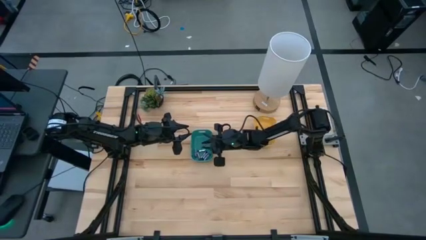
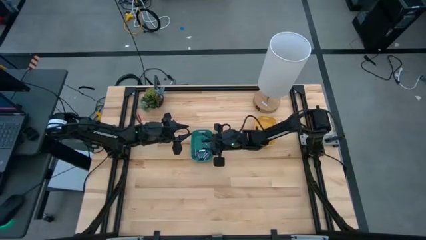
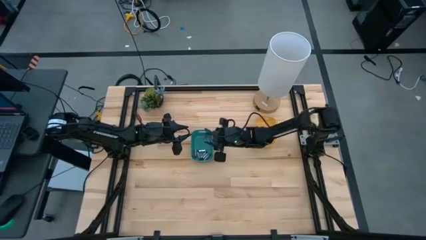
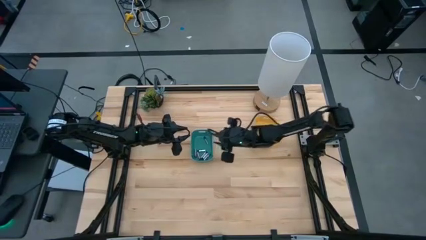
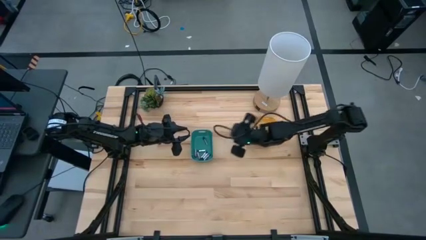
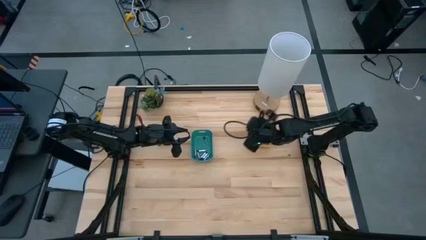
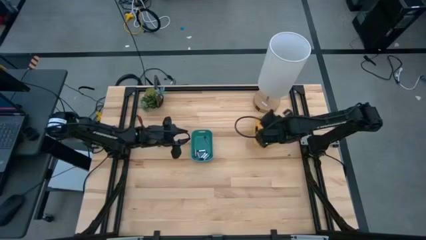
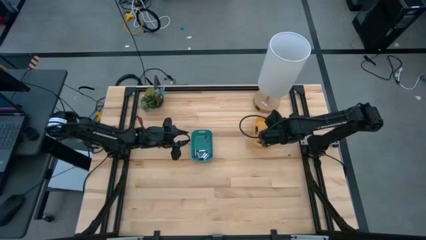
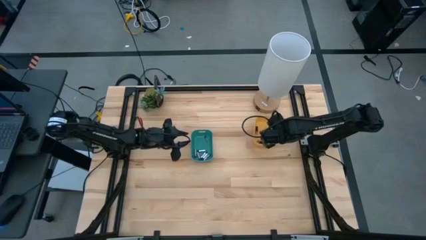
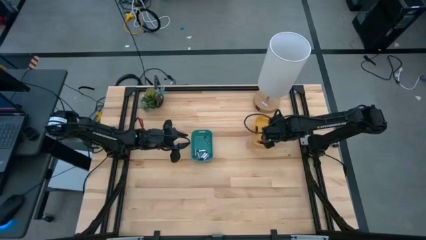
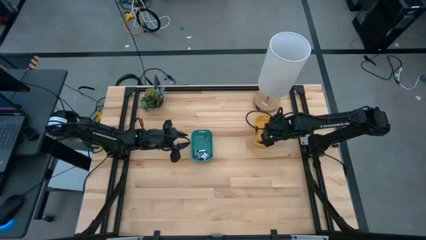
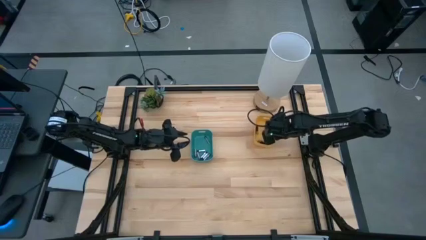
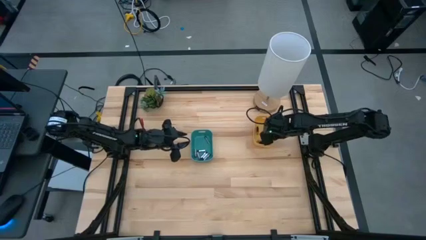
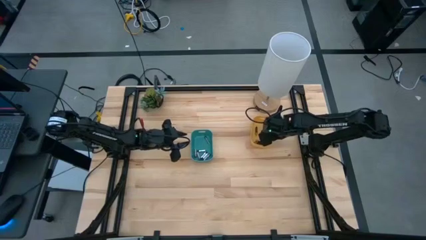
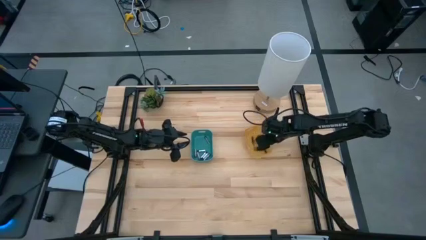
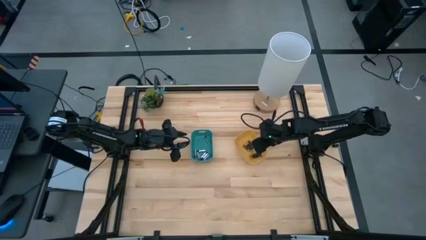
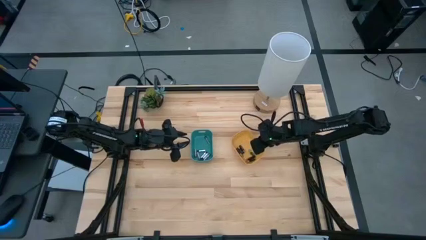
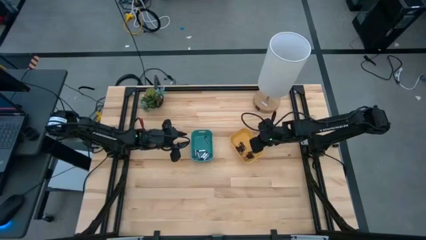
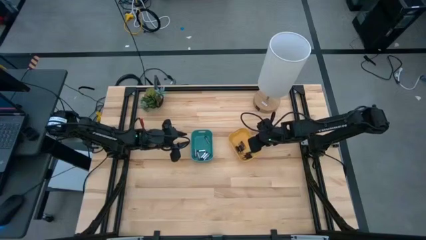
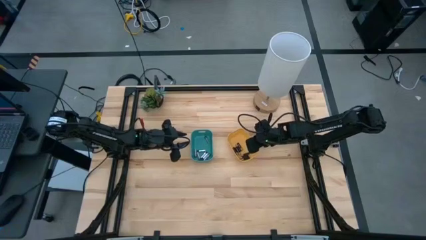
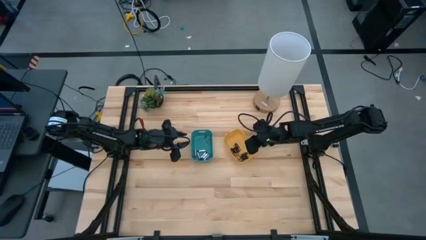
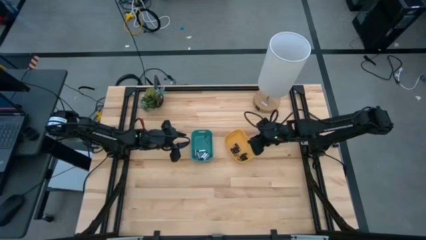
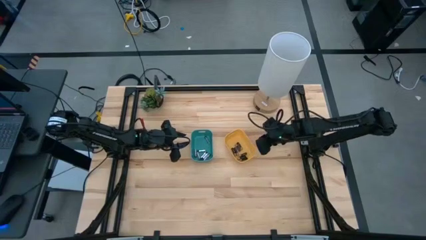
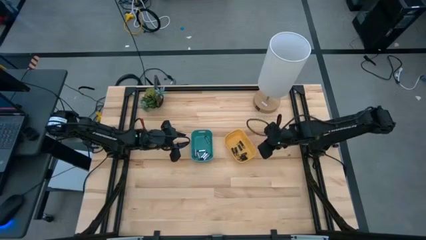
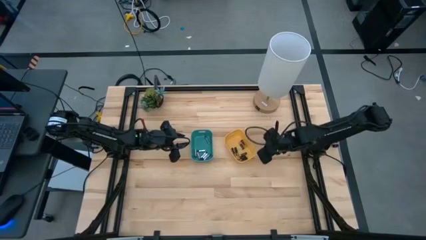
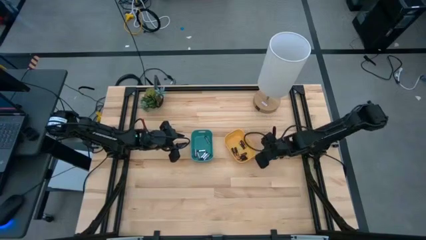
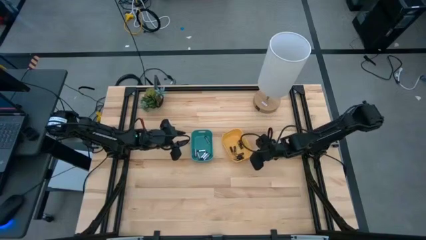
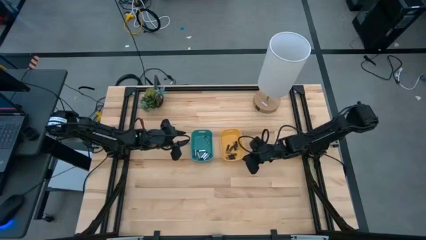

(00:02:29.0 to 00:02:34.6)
Task: Sort batteries
Move the yellow bin to the center of the table

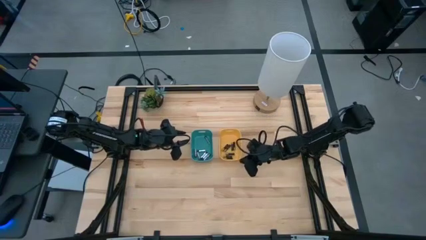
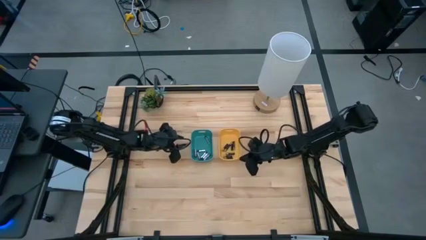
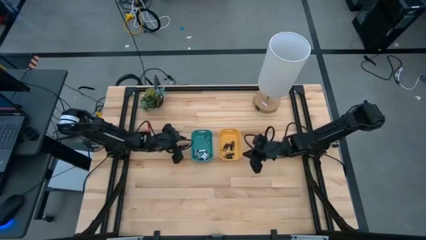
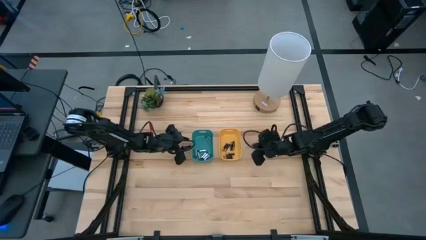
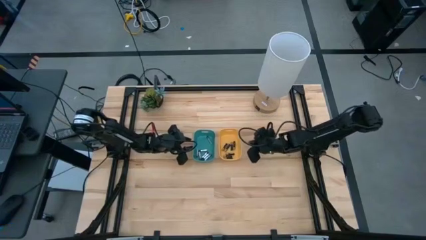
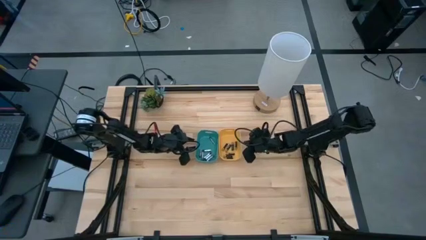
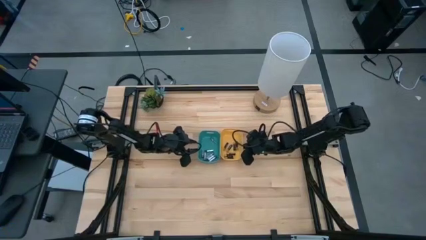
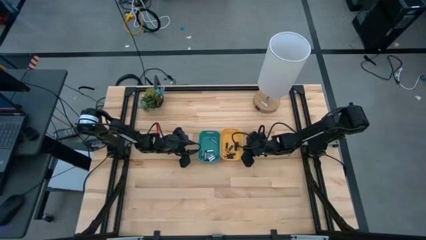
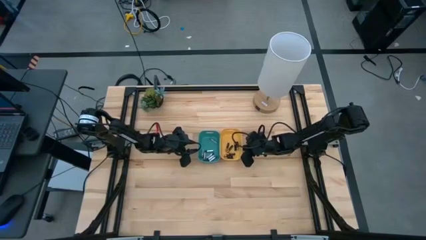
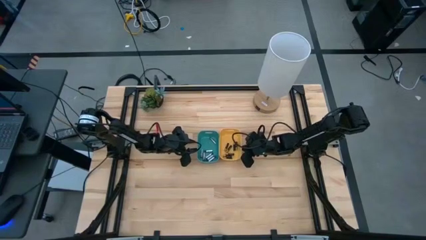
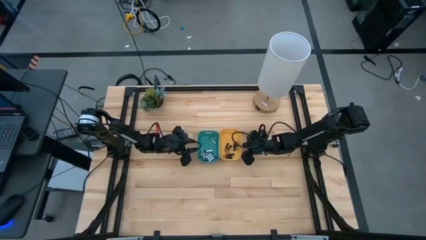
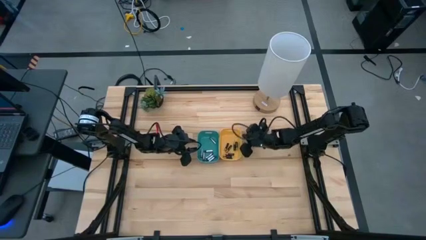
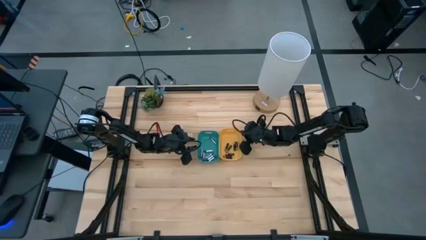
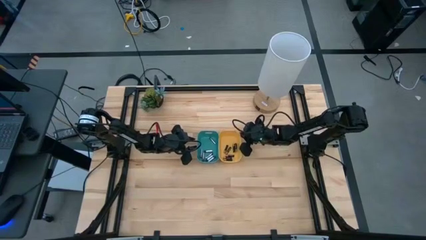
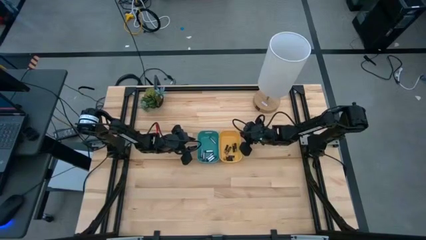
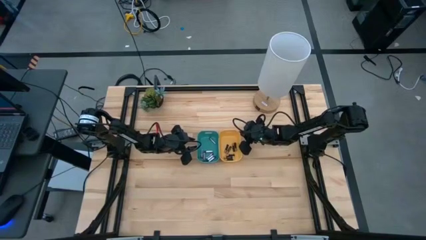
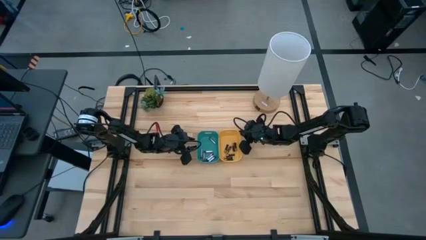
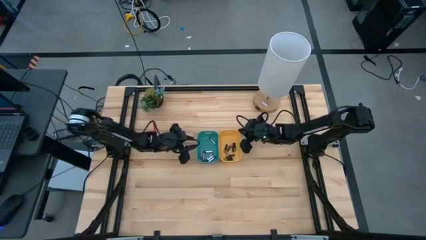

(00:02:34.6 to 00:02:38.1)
Adjust the bins

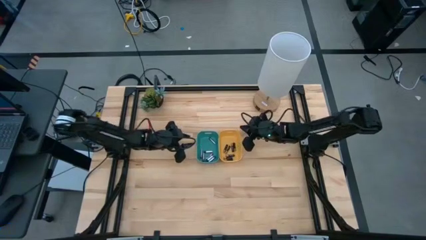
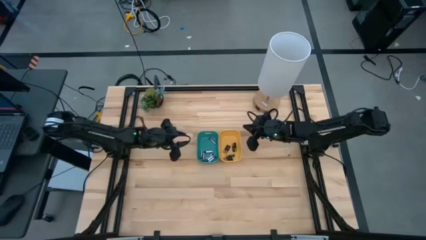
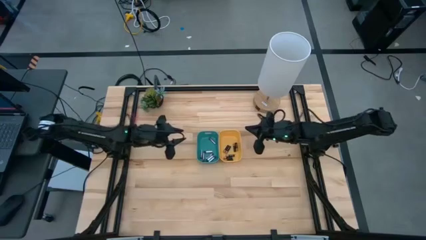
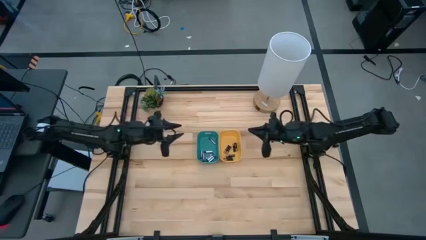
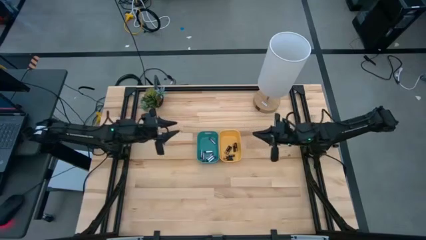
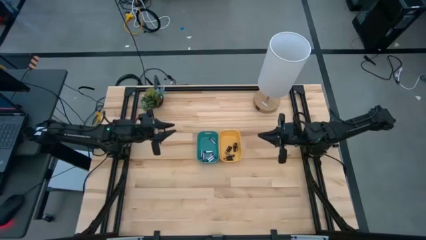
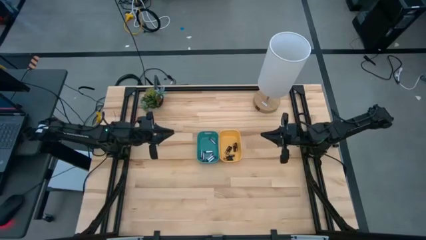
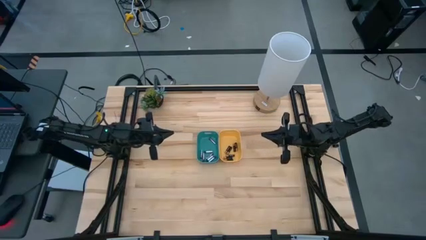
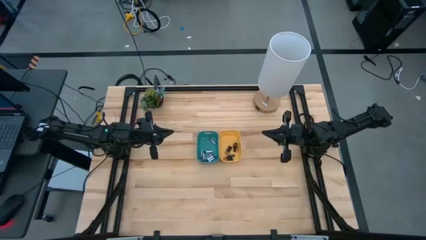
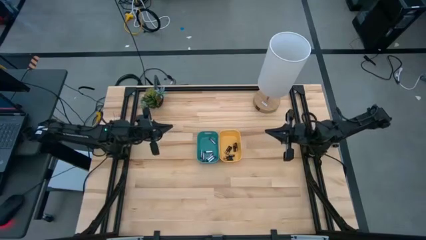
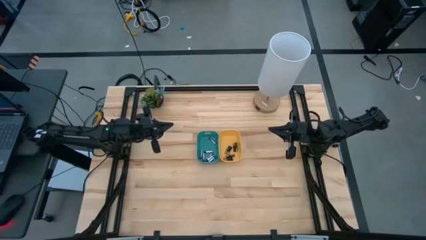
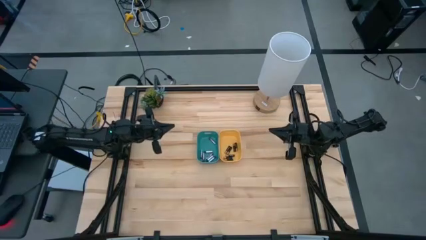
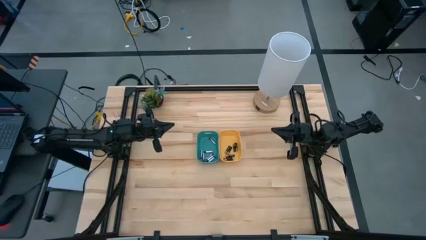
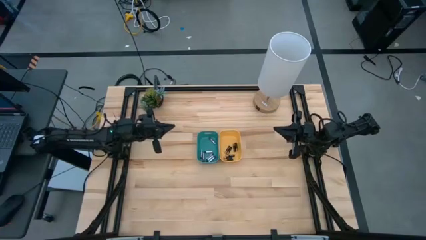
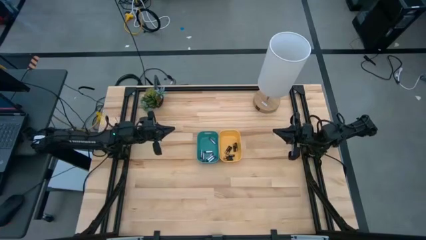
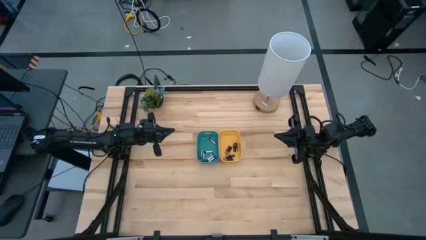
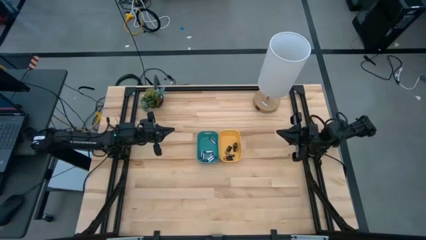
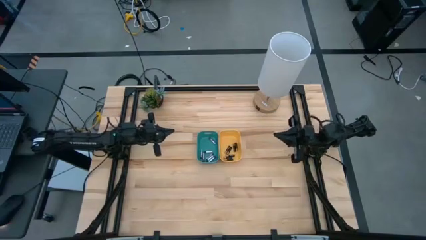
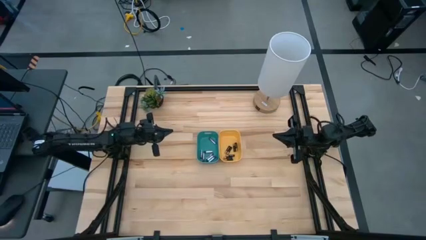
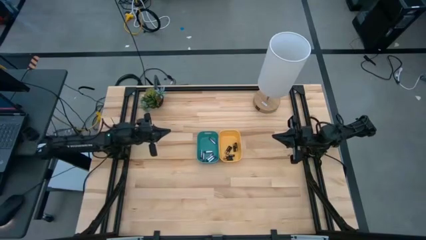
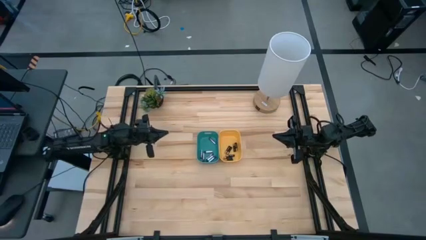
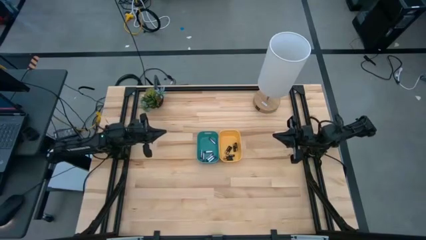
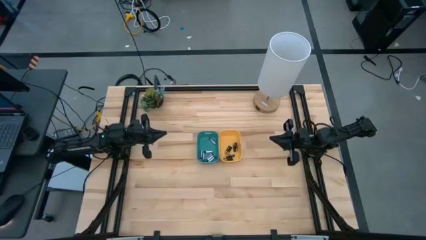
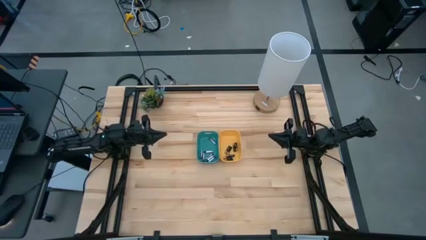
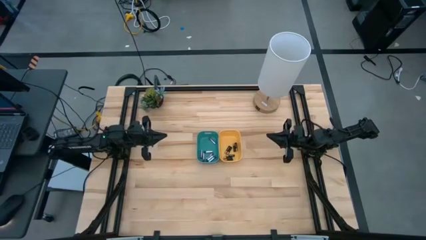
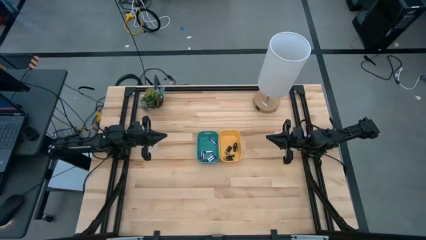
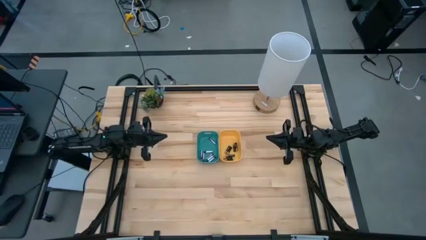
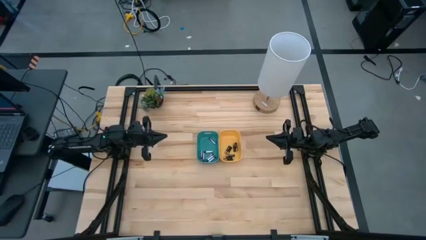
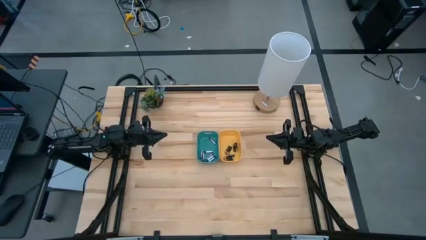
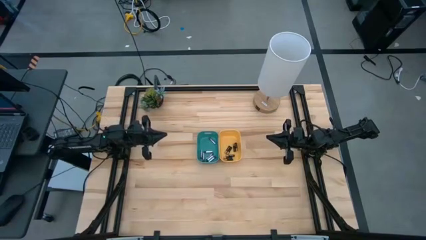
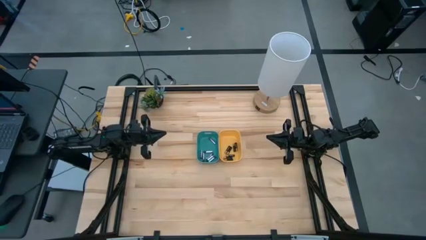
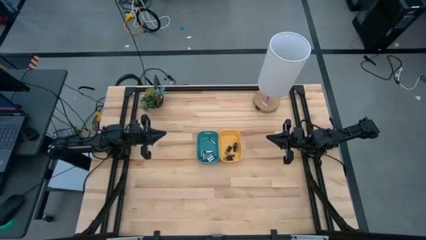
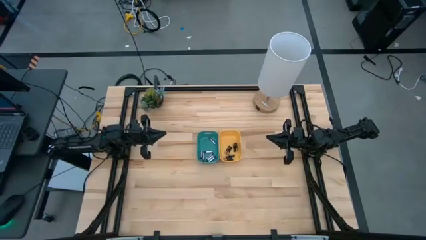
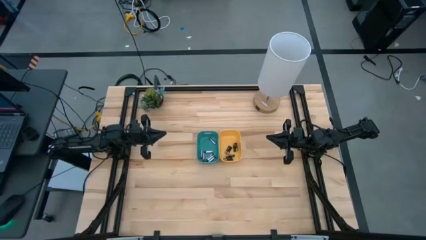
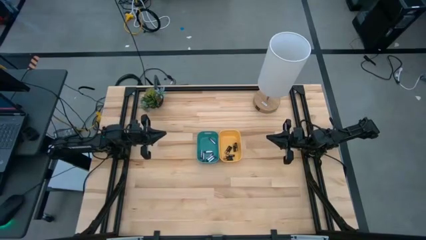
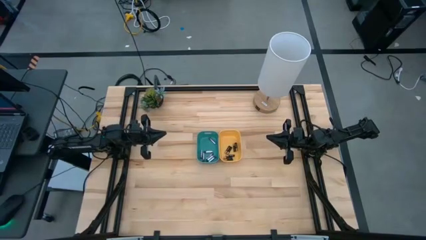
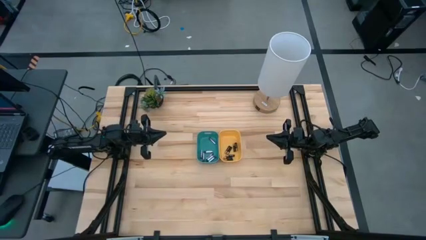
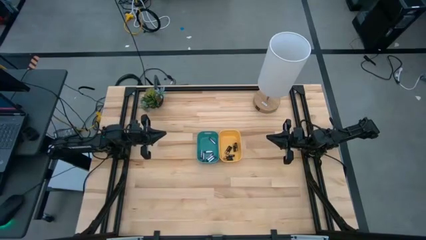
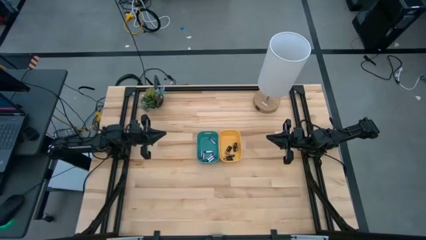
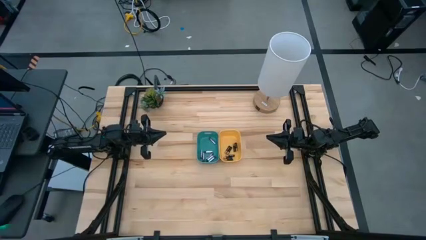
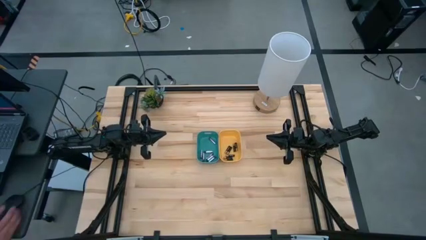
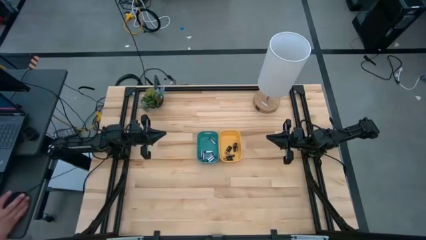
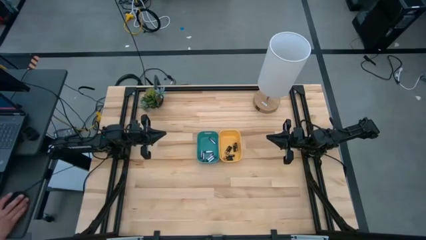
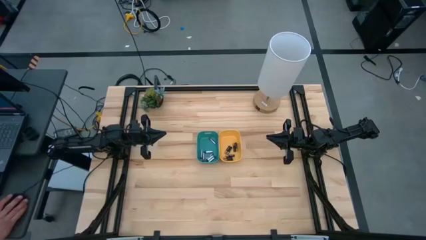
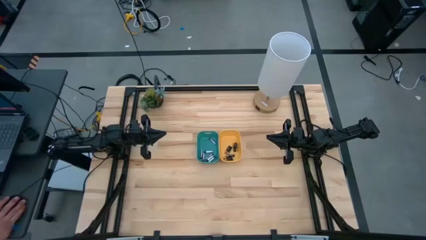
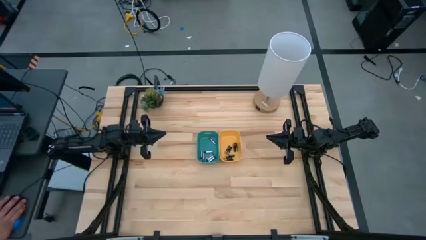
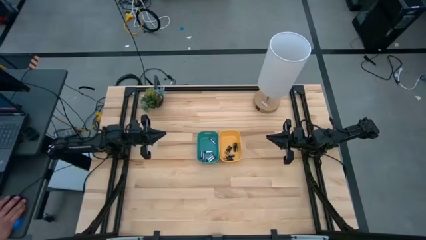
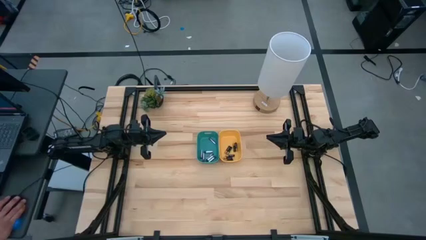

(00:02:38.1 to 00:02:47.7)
Return to Home Position
